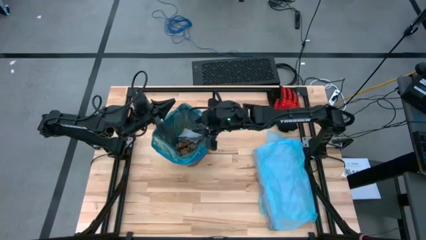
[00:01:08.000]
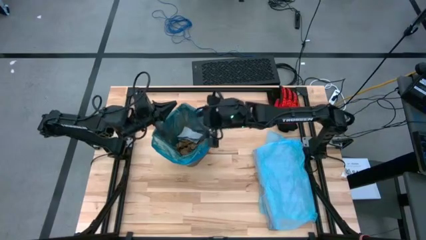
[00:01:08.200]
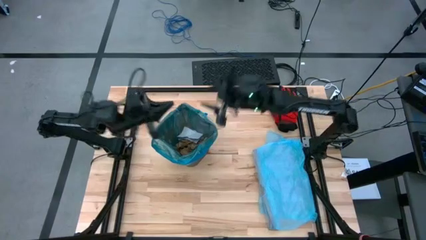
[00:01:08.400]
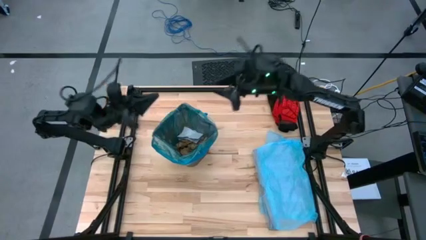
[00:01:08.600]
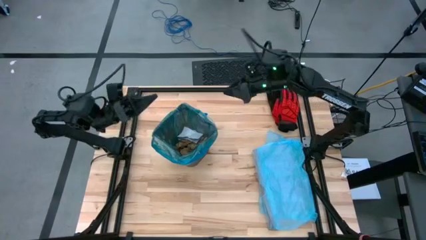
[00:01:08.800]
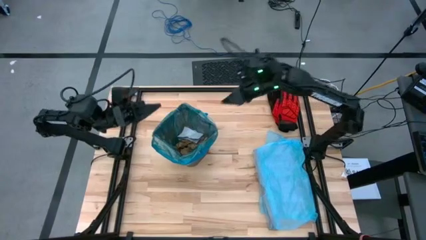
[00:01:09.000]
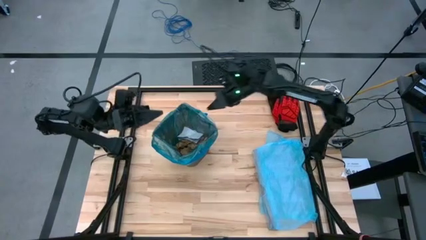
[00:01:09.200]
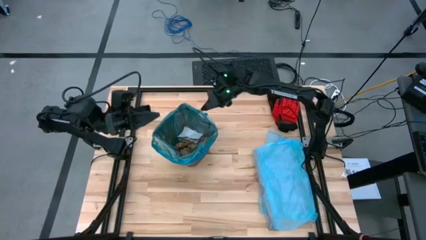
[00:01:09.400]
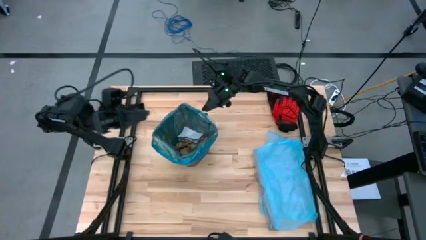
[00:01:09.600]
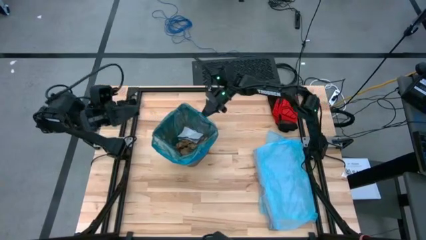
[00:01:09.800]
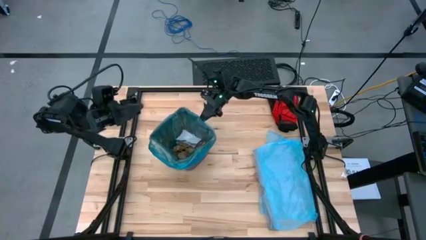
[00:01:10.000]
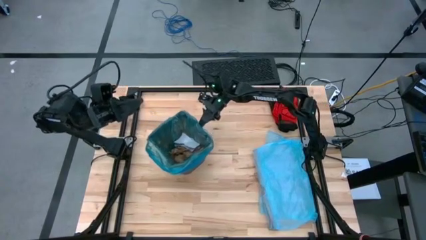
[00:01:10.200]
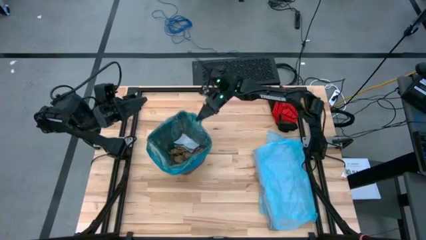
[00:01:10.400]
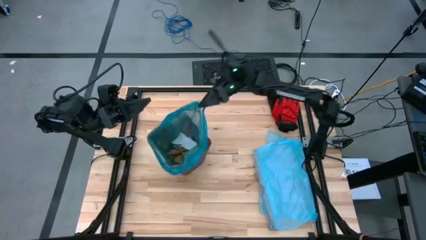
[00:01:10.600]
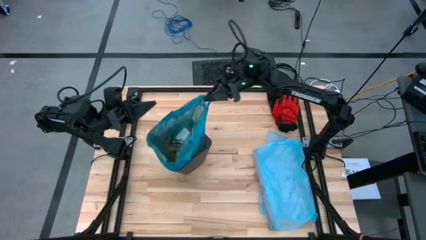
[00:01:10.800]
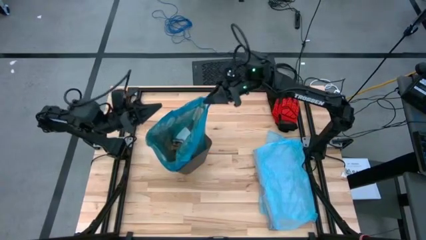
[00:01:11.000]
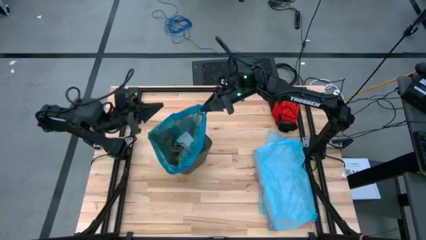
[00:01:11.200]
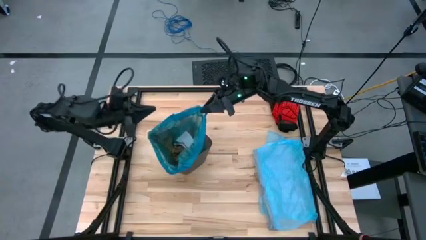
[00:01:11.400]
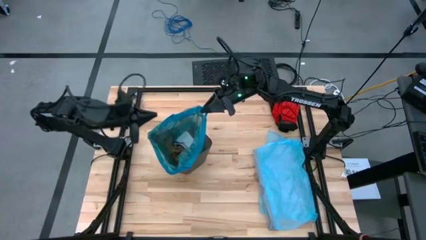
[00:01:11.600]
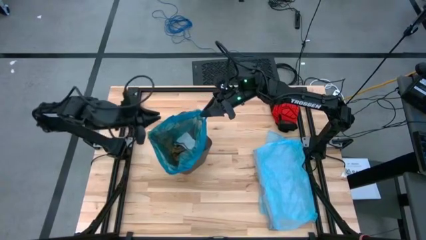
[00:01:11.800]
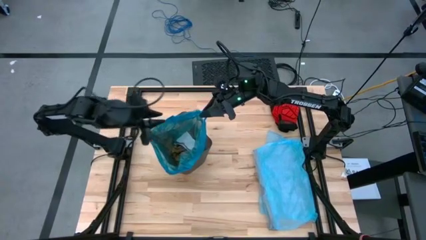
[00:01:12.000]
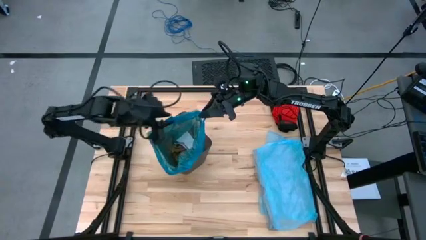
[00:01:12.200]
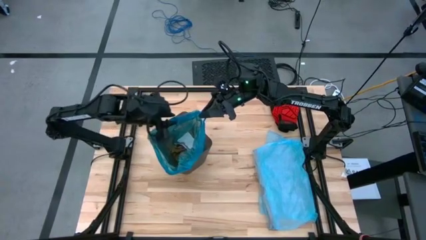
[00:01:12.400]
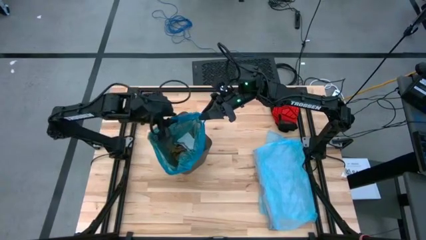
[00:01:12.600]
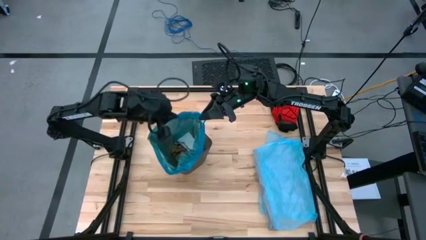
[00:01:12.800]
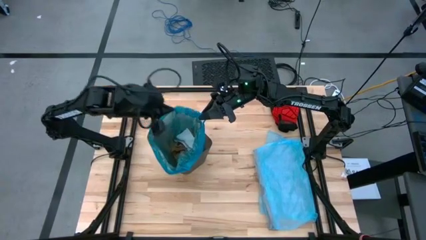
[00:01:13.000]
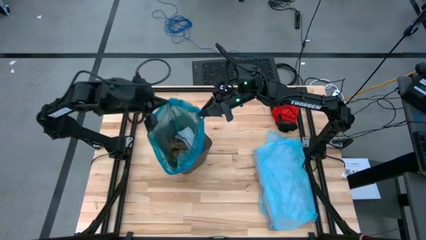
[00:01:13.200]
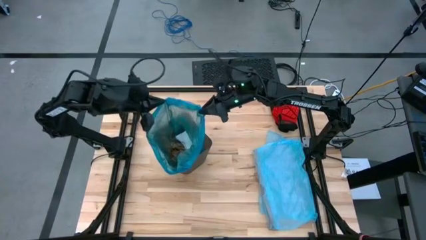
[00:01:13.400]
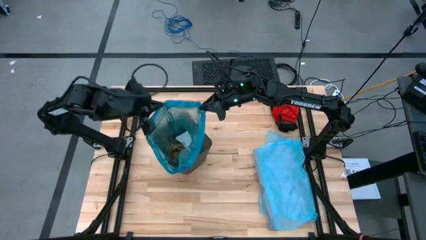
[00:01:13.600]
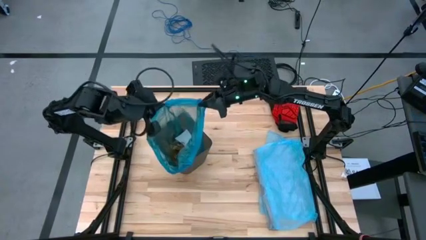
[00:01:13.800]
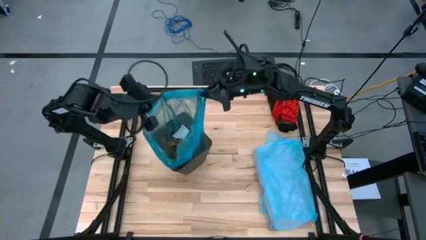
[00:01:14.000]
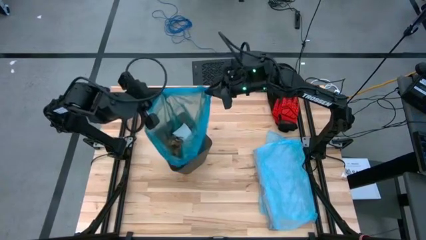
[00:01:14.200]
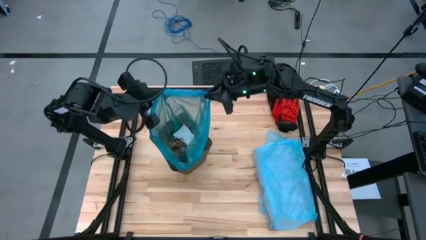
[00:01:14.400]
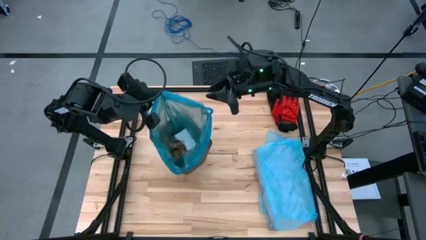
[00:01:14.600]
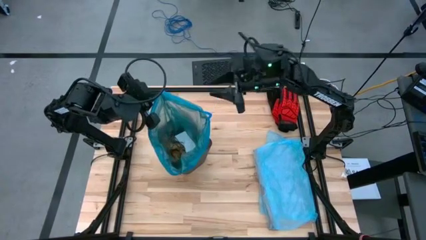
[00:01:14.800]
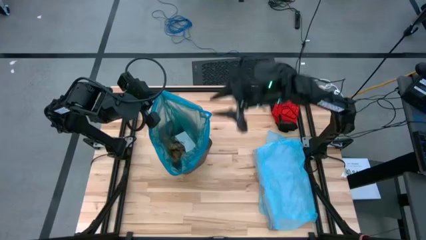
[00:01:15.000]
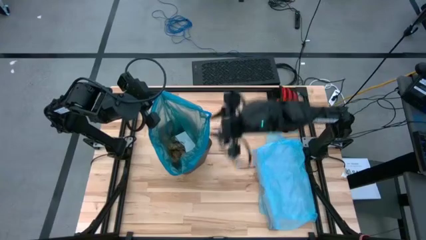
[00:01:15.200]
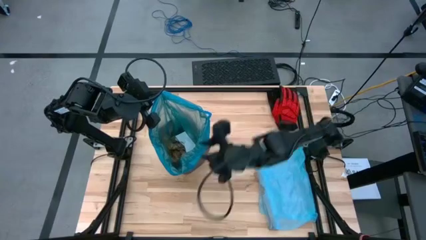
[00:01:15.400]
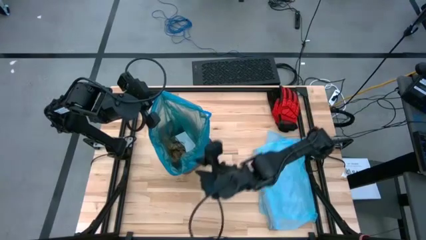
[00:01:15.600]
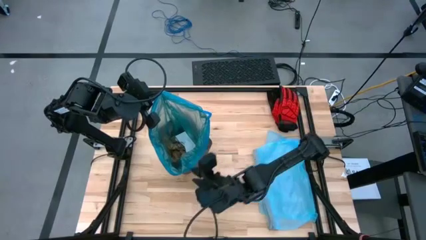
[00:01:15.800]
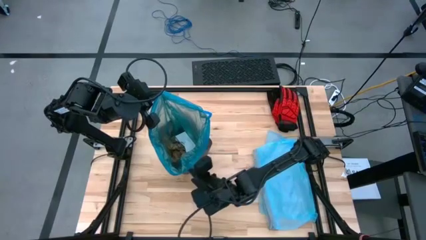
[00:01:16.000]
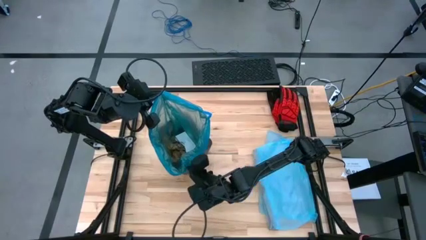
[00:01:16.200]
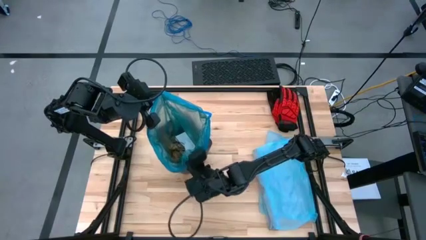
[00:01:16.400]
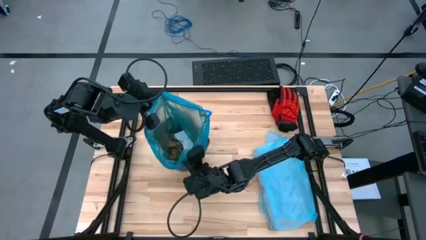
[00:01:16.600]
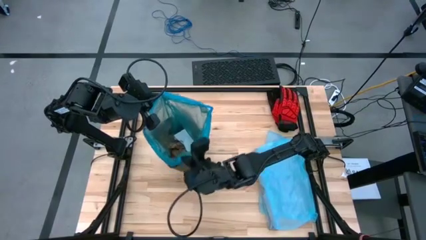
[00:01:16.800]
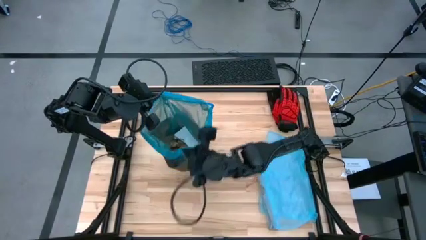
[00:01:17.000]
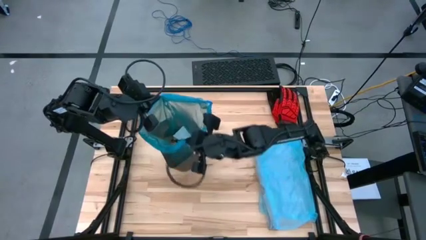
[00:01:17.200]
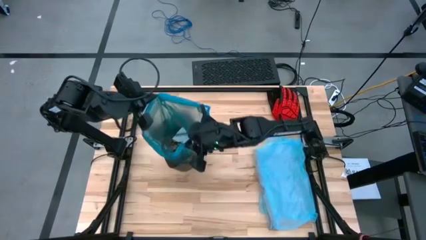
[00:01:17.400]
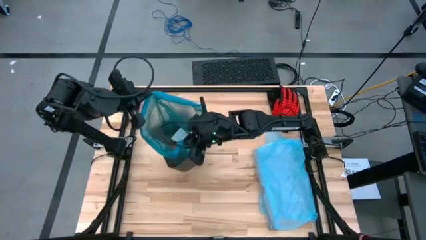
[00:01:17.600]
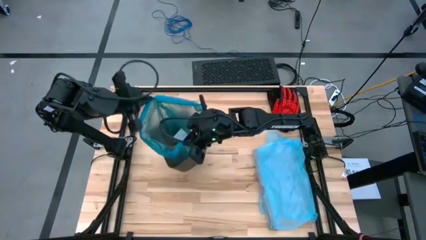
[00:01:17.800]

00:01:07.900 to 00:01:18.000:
Task: place trash/remove bag and relplace
Close the blue trash bag in the trash bin

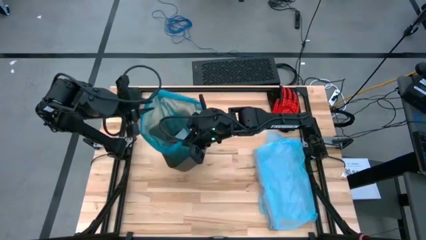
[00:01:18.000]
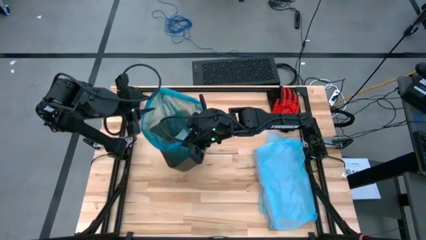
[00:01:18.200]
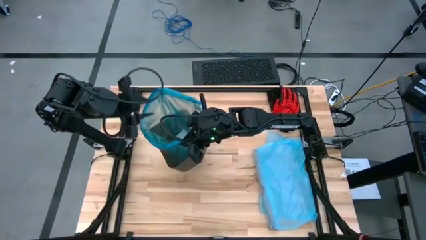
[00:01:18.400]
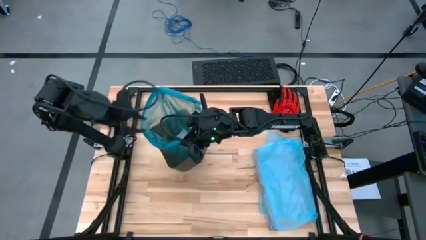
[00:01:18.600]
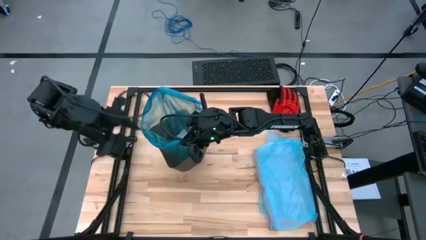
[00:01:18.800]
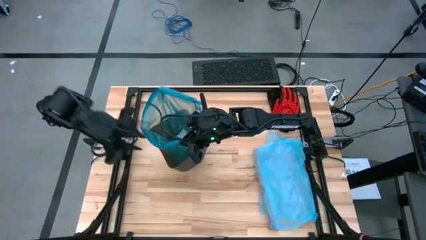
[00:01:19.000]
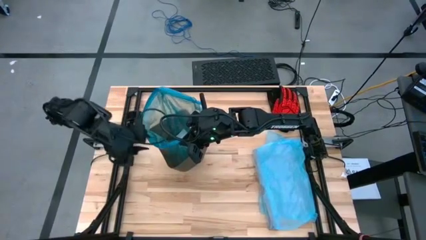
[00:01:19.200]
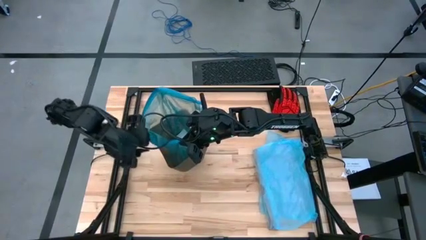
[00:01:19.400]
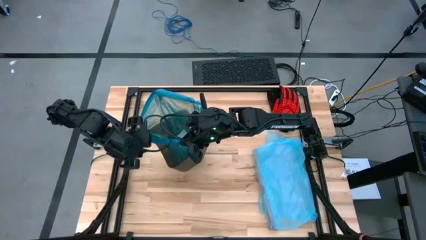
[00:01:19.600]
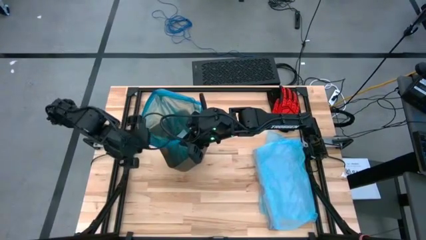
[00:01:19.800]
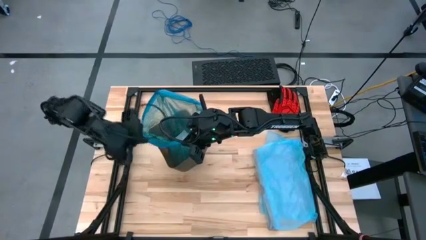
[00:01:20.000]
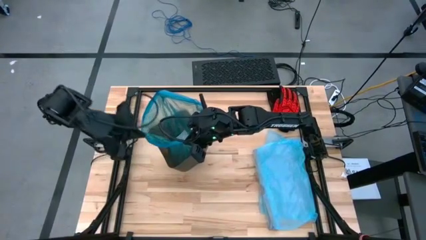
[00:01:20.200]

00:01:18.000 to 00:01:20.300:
Close the blue trash bag in the trash bin
